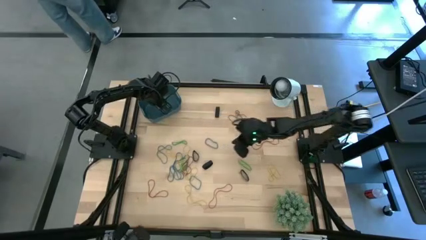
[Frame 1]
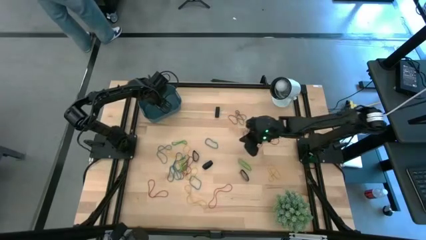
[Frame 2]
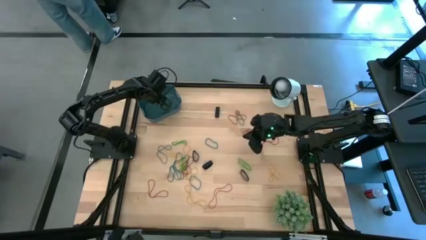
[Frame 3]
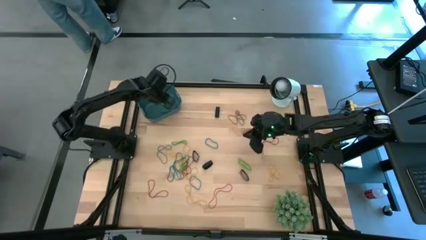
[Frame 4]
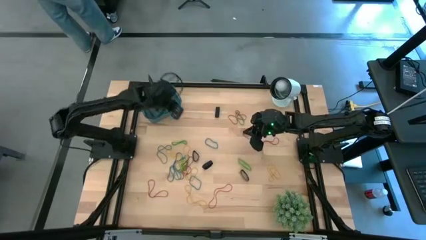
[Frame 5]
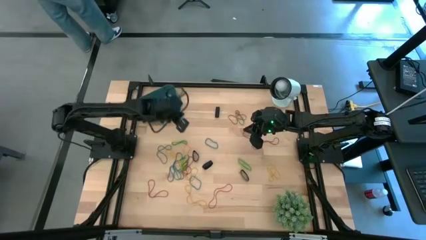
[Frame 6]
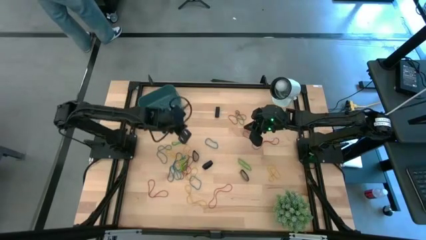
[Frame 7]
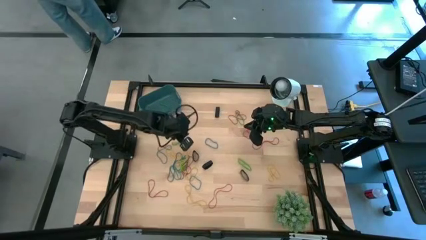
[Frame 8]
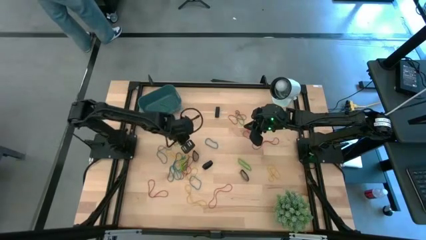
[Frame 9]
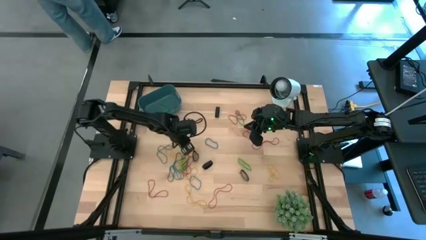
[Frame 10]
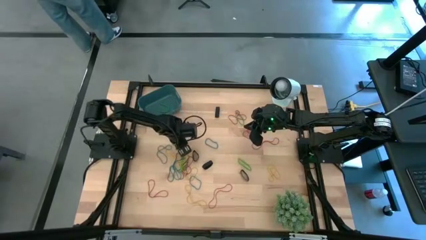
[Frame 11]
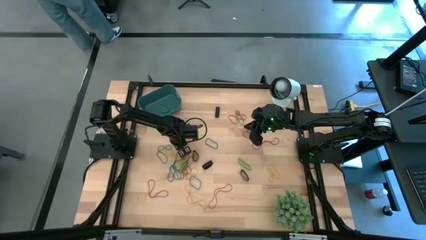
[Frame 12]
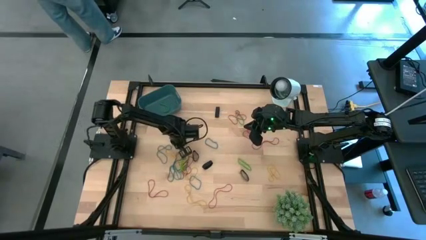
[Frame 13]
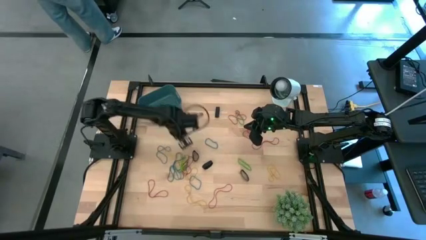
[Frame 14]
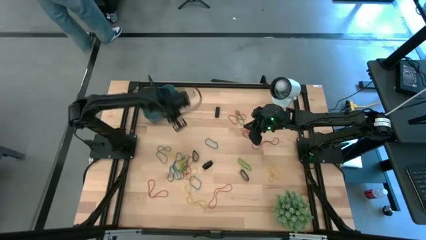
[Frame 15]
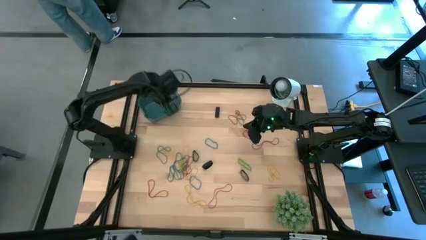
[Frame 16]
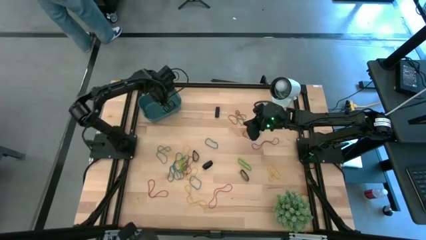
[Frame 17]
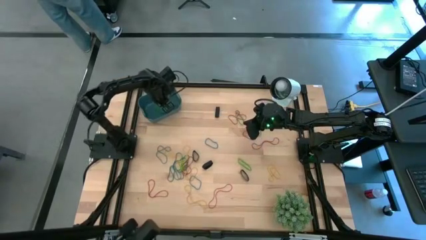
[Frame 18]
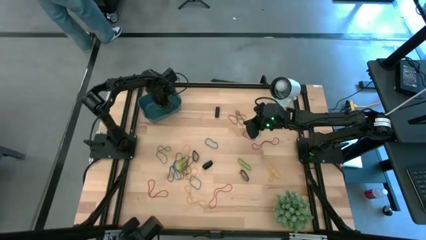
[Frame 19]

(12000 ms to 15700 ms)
Task: Pick and place rubber bands into bin
Put the green rubber band into the bin

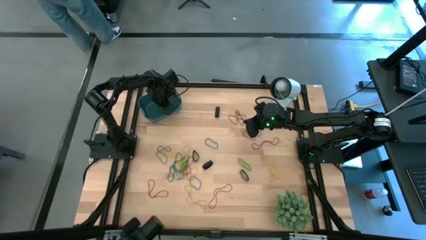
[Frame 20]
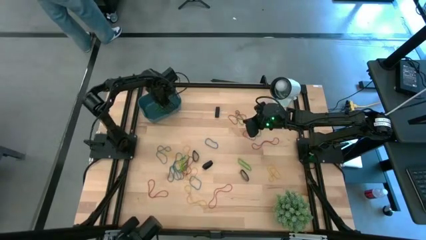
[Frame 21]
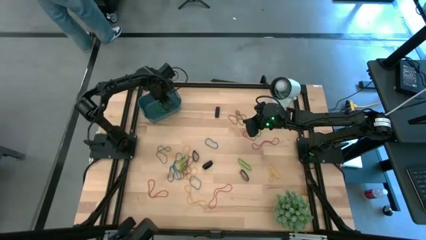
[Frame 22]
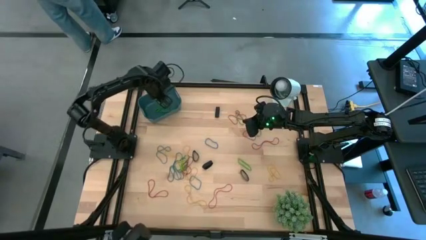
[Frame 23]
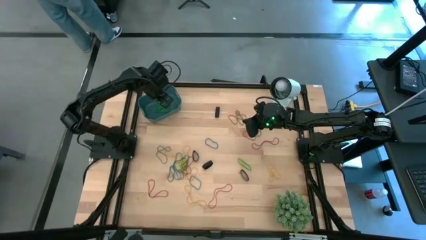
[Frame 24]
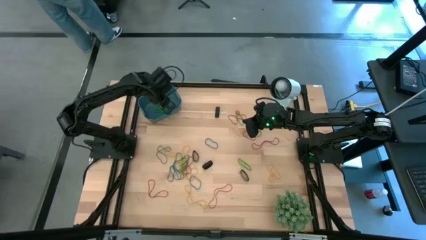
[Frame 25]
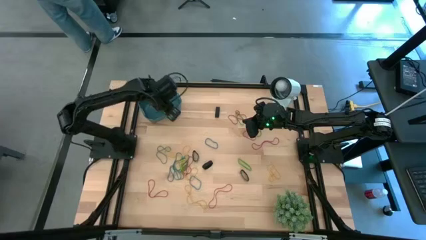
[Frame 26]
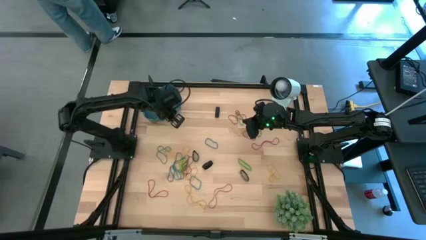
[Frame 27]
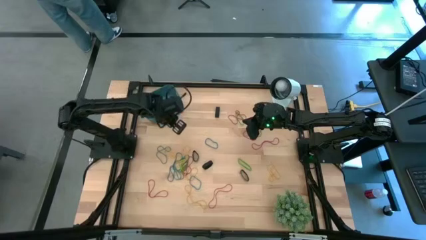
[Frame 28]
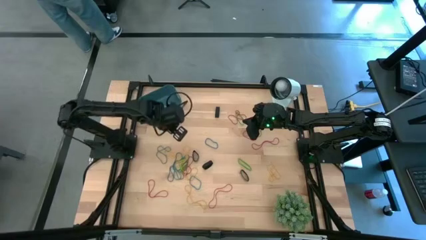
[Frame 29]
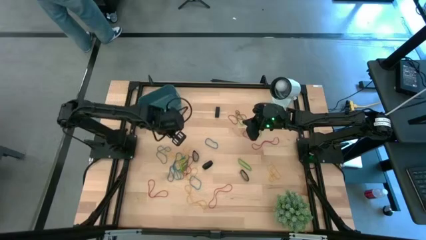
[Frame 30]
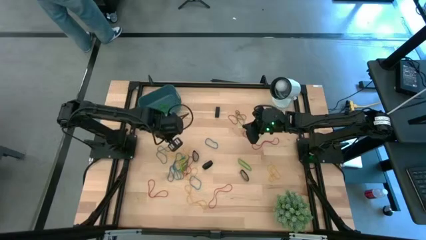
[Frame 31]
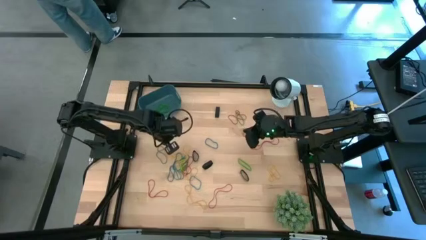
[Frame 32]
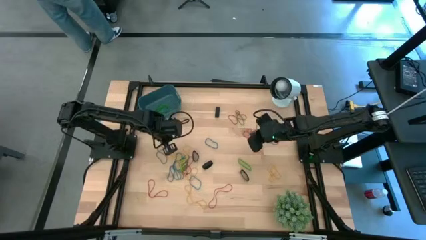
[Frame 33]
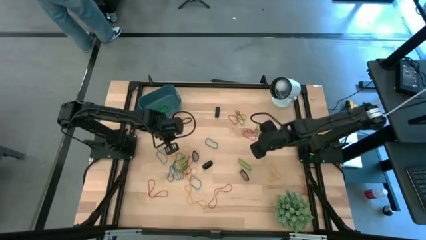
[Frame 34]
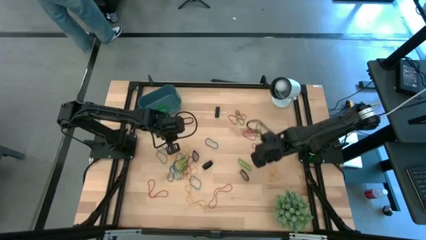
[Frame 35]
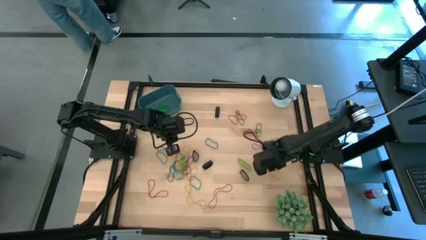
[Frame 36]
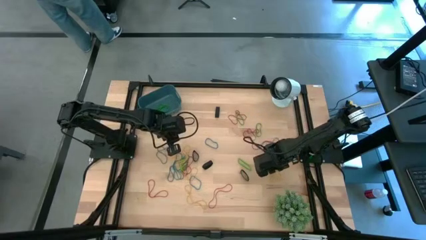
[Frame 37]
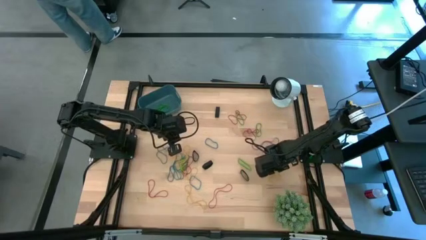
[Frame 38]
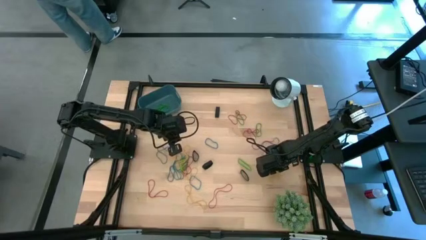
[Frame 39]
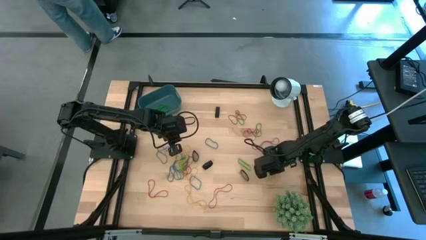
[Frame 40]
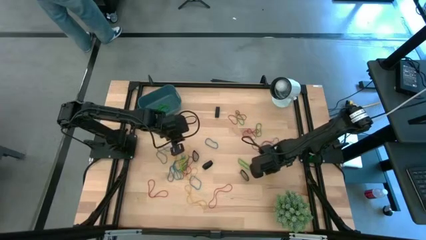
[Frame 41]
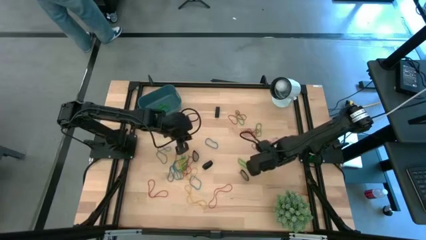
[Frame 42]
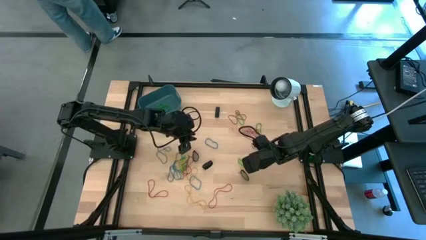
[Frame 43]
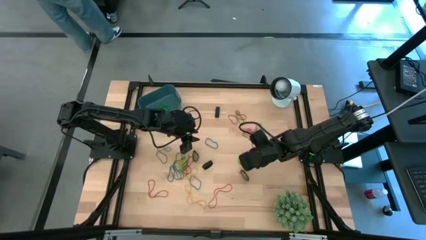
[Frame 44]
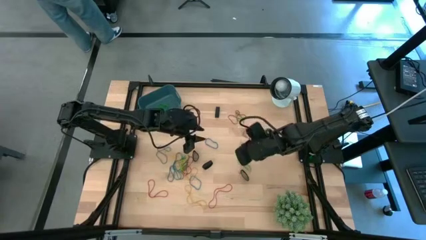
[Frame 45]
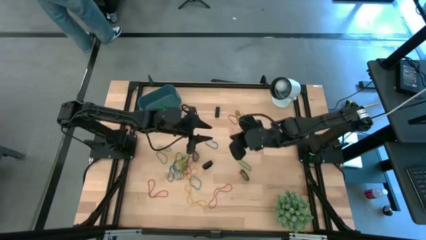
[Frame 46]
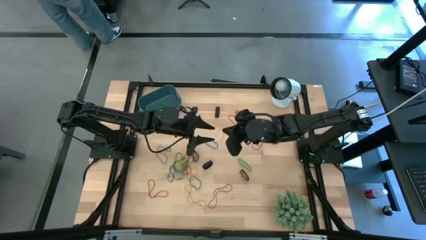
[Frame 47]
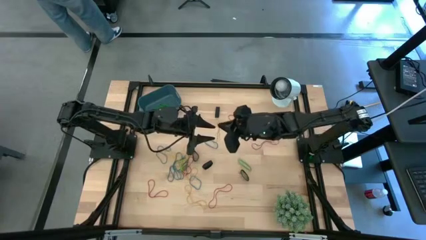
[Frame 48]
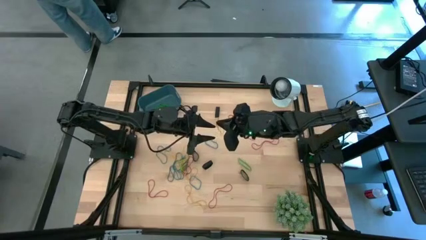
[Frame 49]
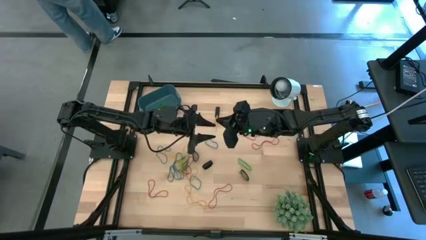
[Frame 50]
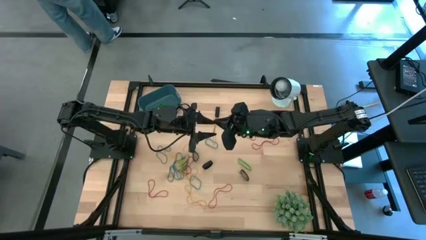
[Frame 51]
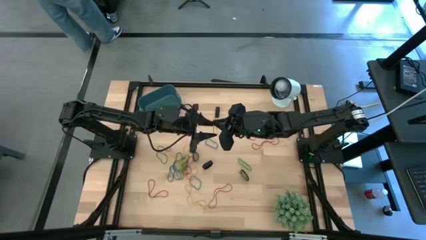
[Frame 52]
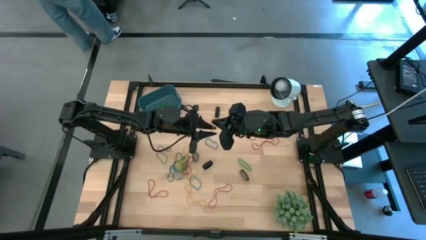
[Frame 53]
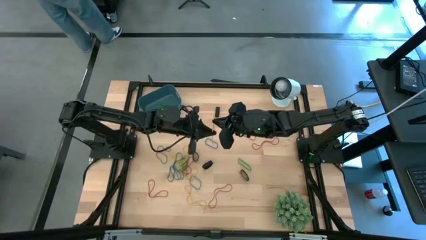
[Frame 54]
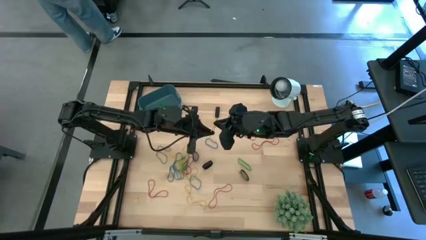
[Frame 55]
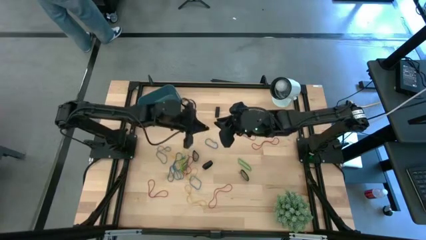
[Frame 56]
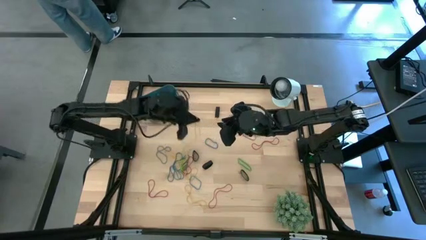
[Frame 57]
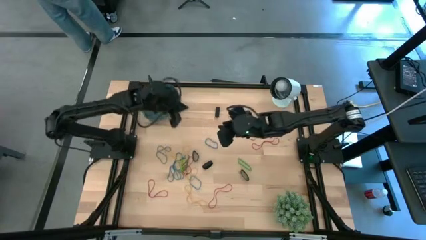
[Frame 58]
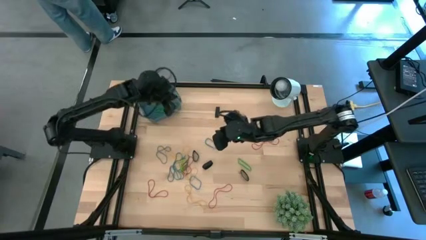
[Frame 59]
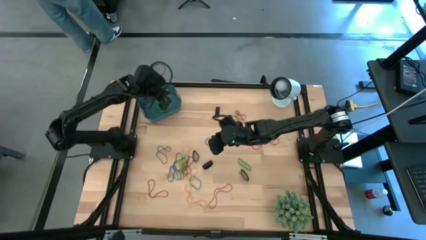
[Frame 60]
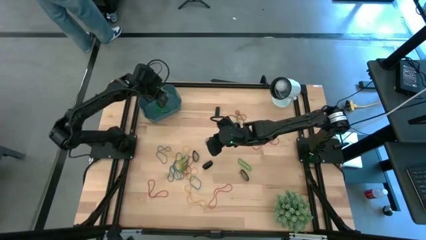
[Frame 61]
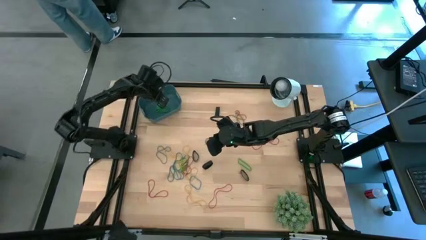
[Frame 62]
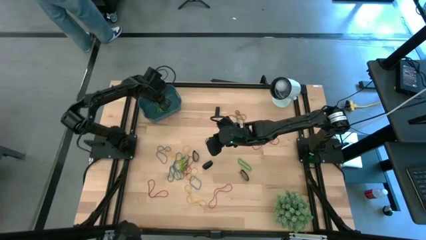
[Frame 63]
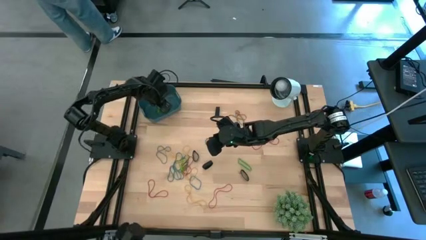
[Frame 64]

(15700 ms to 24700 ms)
Put the yellow rubber band into the bin

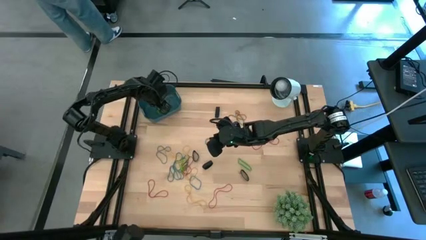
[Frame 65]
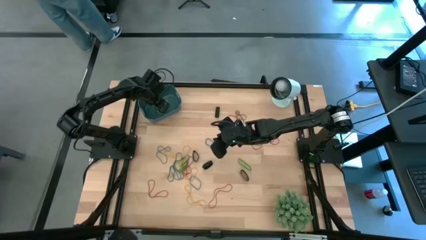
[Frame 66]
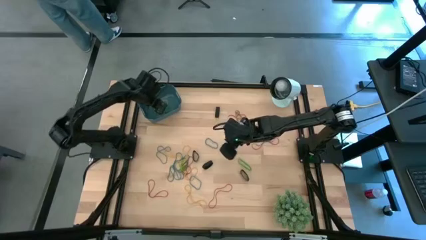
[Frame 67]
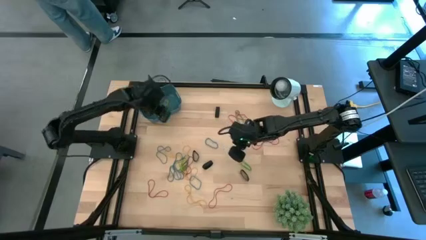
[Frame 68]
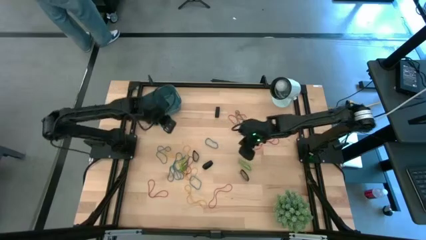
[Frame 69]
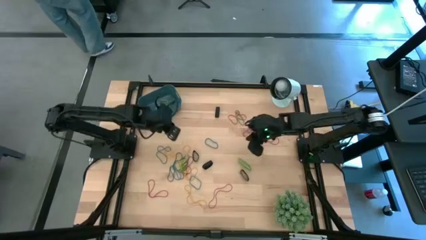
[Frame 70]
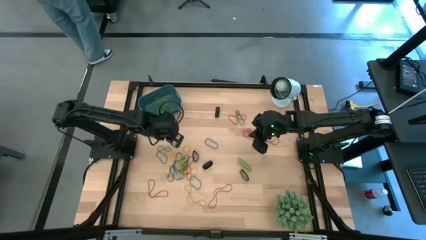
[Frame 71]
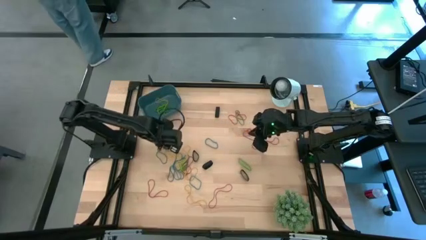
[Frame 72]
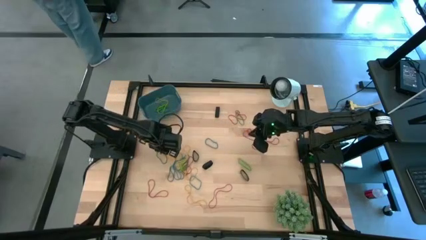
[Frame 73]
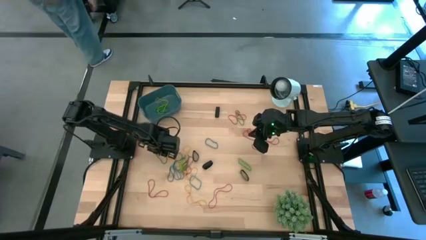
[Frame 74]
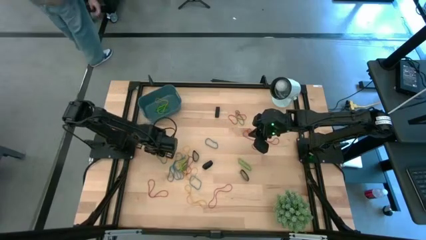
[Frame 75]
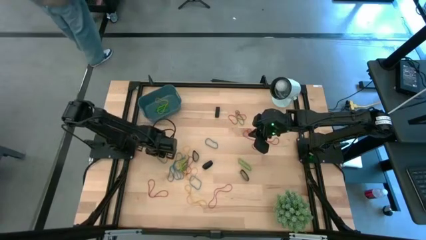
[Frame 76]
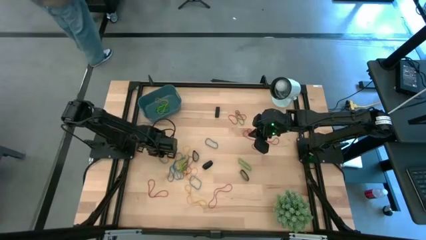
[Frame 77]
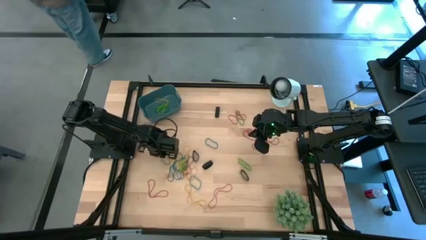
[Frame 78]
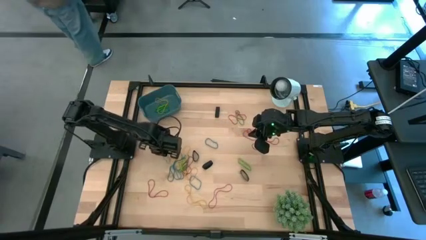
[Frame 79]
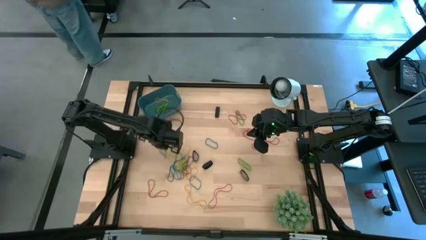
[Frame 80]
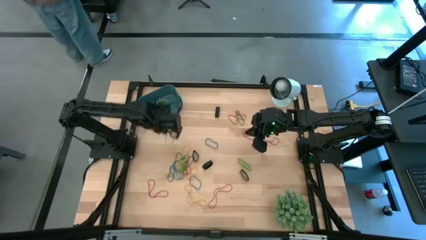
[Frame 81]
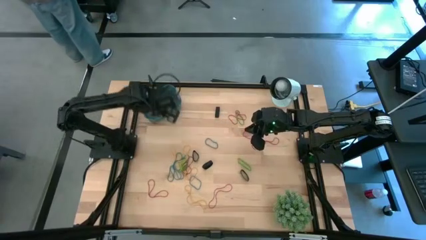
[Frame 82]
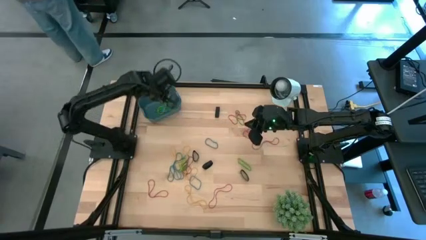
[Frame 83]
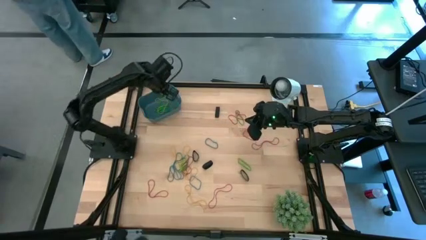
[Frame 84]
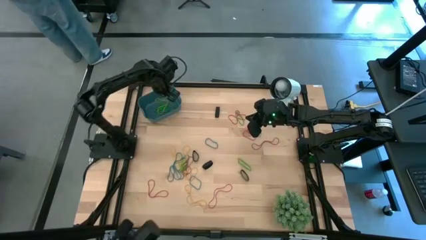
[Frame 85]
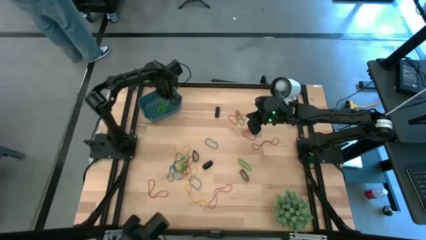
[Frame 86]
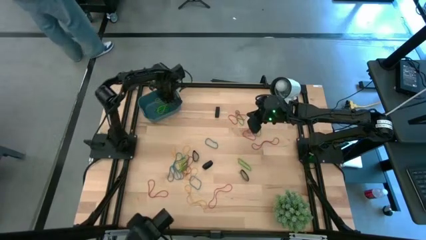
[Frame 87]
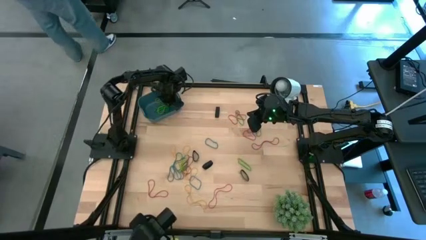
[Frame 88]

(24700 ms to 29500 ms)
Put the blue rubber band into the bin
